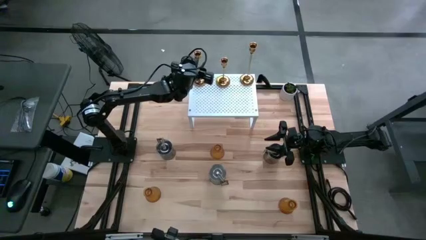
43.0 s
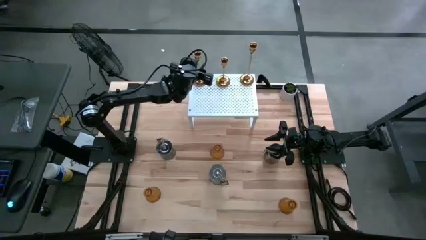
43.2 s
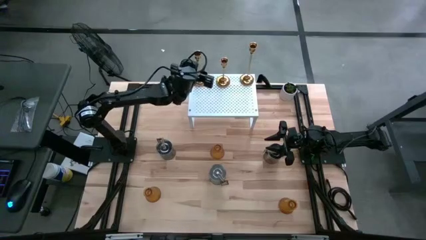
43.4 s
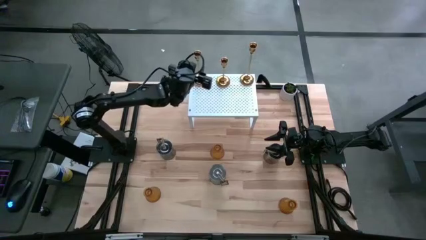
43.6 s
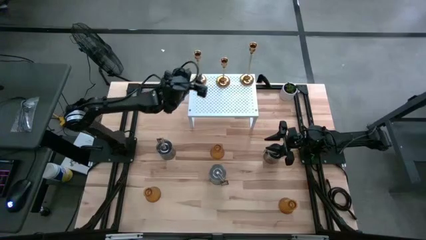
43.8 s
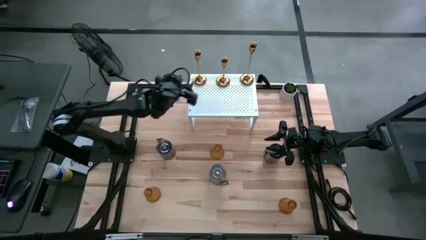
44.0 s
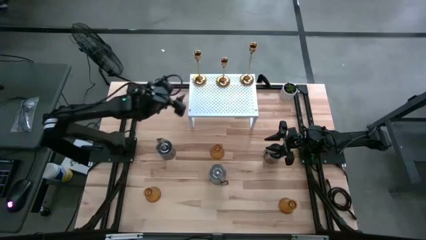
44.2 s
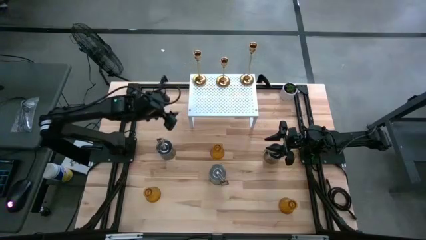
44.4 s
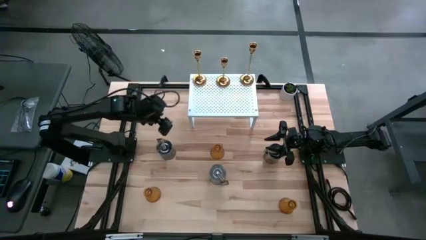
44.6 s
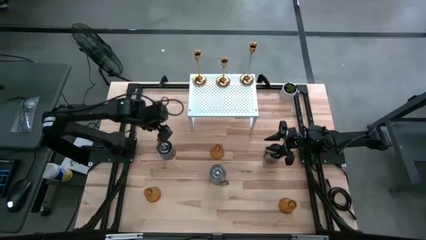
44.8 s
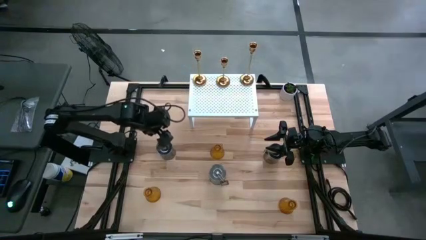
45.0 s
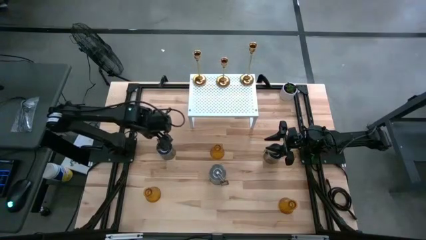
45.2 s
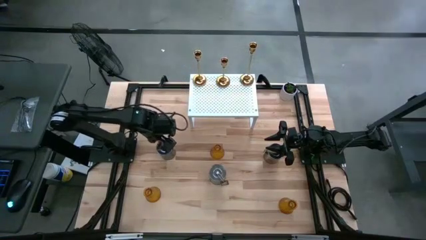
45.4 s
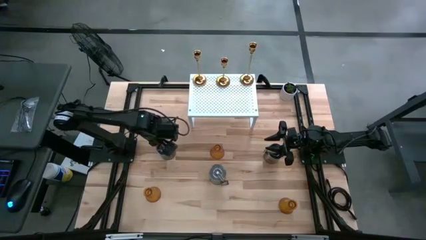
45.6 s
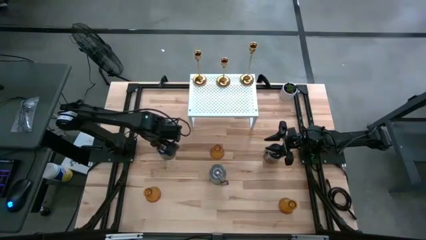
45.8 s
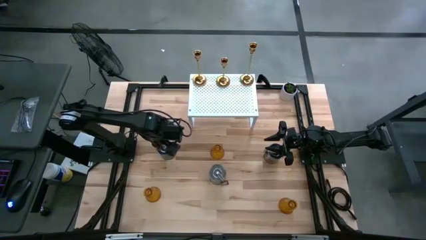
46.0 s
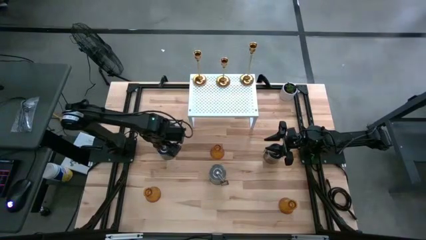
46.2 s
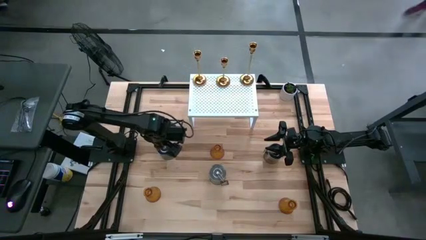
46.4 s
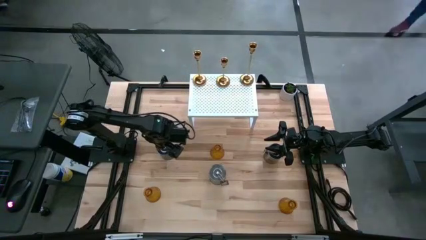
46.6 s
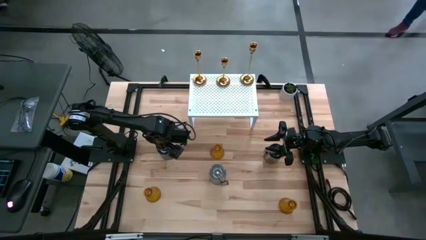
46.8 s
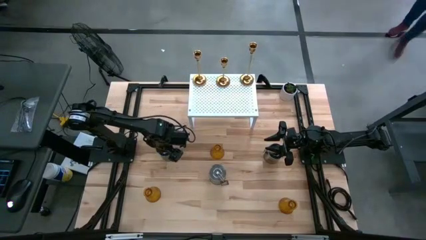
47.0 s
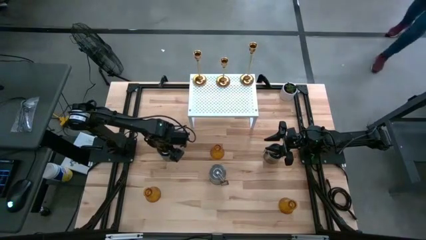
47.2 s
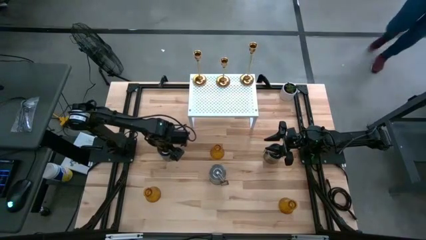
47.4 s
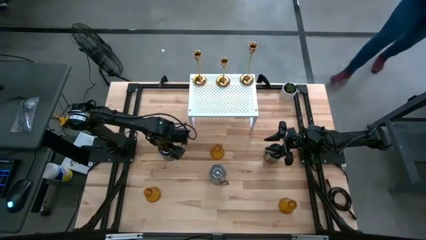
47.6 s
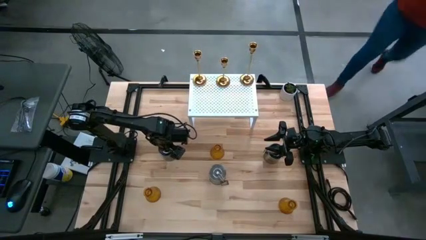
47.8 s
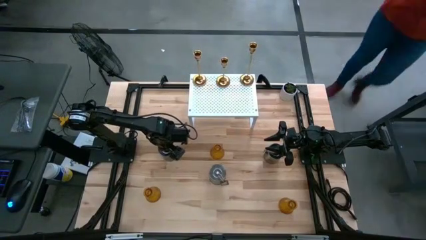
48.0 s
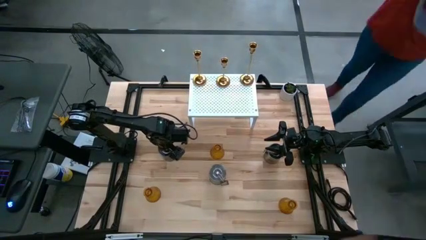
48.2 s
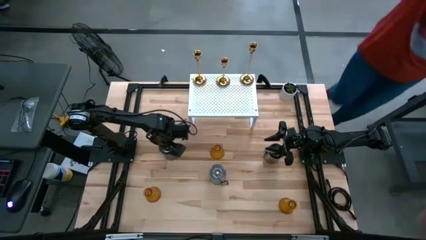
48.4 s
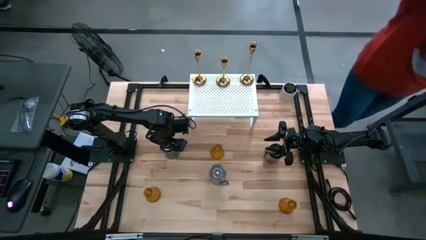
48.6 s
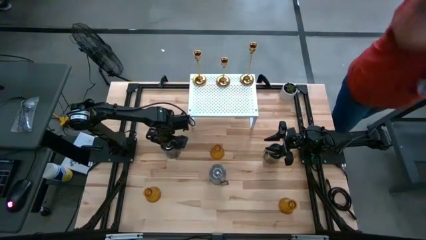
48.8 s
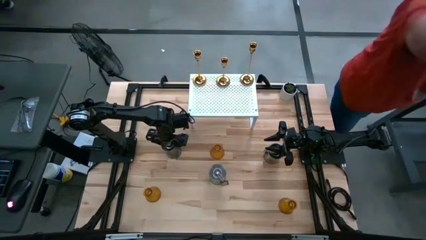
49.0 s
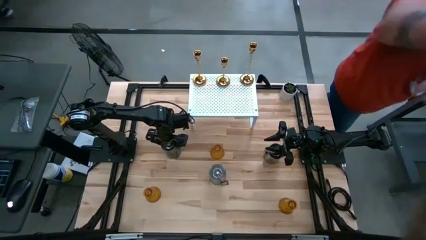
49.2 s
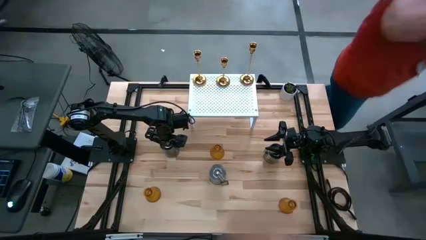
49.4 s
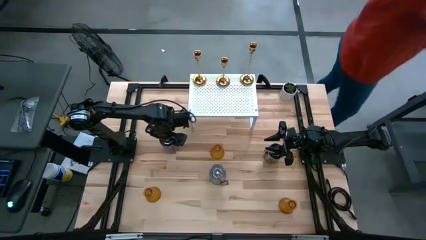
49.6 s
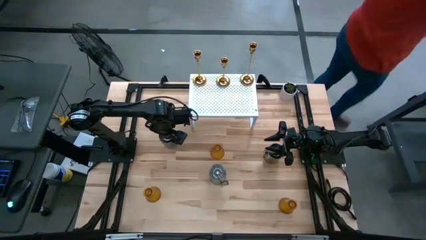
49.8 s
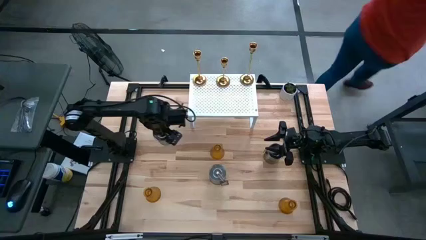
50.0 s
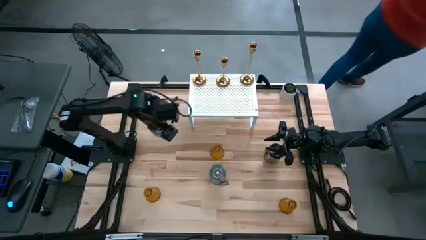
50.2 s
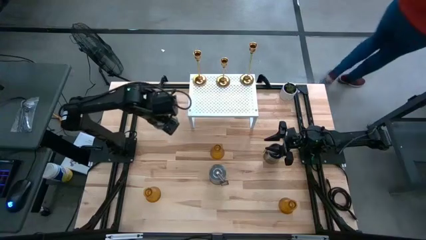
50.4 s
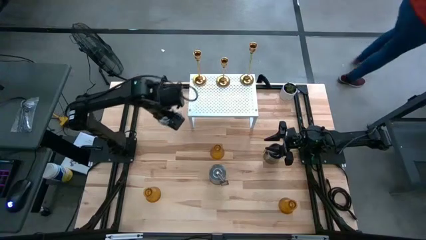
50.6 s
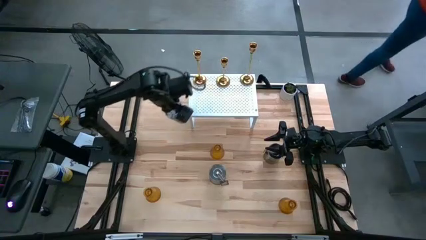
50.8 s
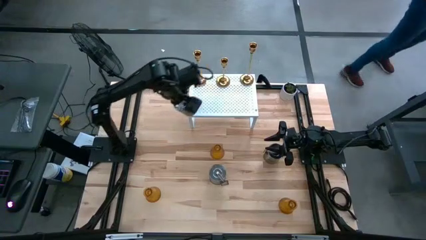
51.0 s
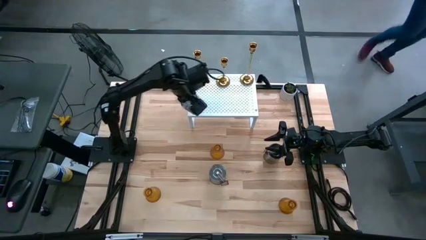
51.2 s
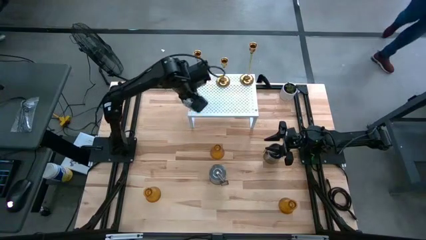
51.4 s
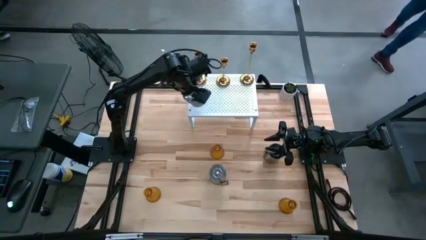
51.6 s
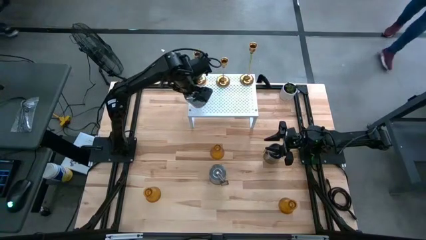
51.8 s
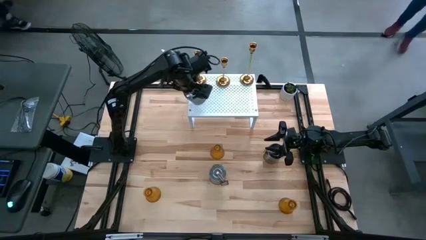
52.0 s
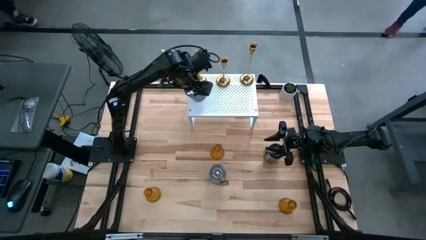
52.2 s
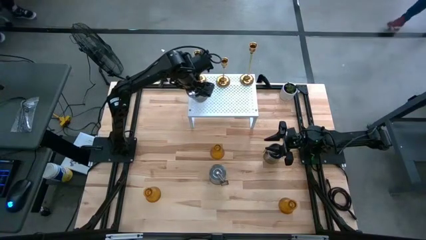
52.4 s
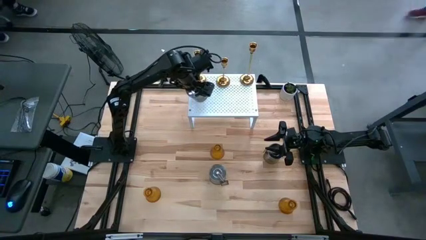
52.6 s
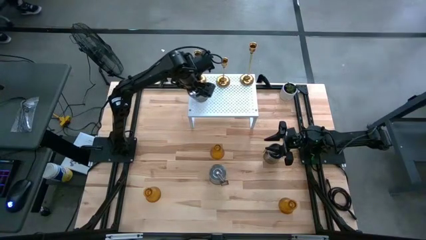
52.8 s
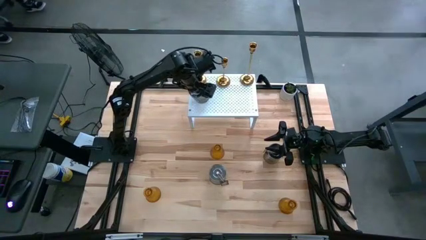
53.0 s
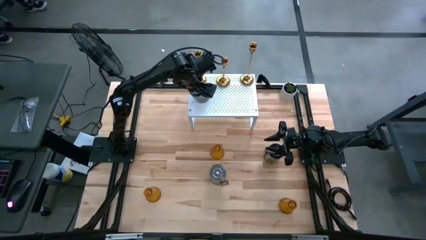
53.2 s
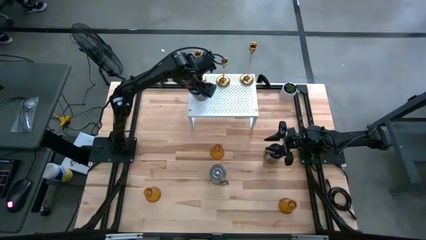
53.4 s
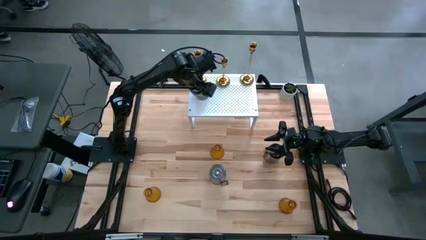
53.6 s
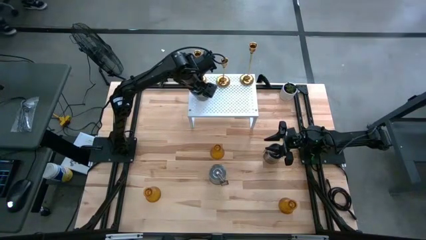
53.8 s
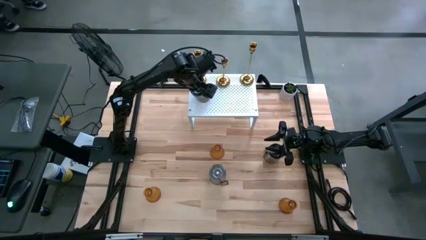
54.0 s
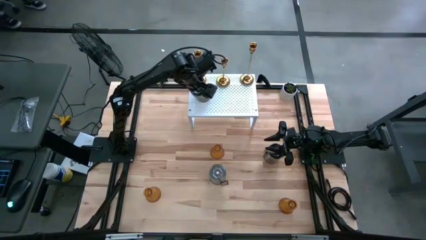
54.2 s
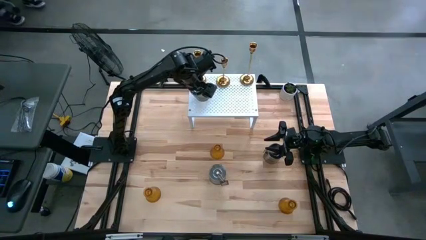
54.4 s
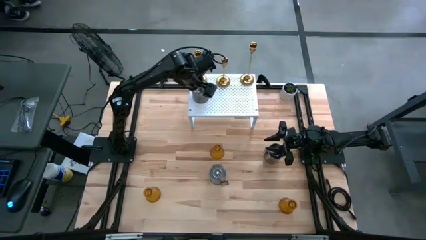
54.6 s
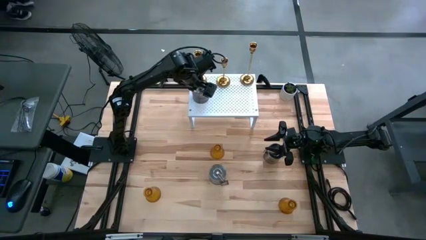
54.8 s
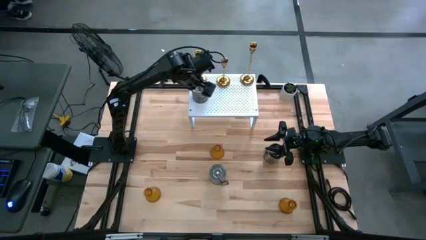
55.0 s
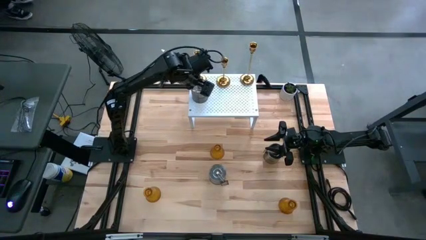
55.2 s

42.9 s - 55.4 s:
Task: Pick & Place candle stick holders
Put the middle left scented candle on the shelf

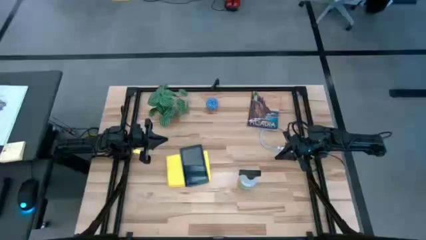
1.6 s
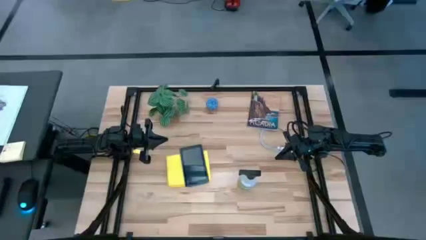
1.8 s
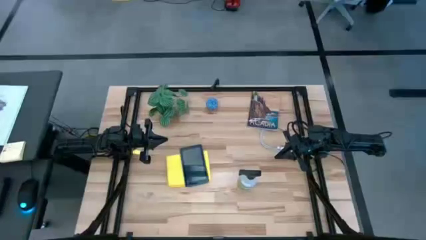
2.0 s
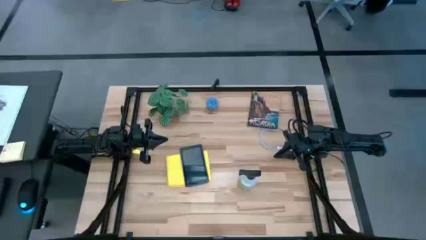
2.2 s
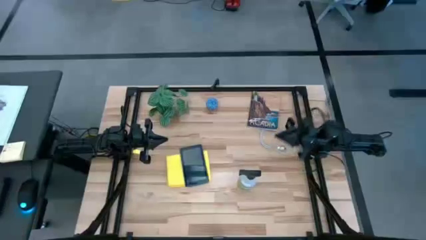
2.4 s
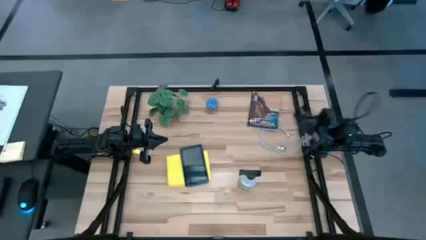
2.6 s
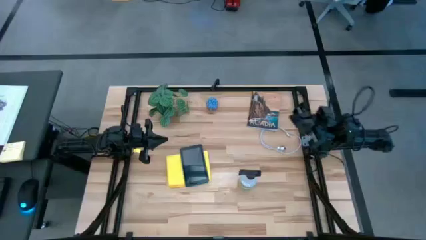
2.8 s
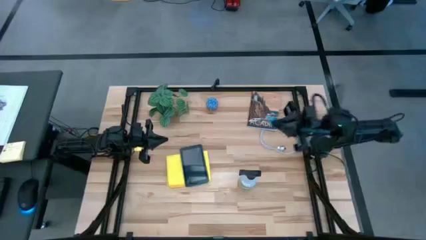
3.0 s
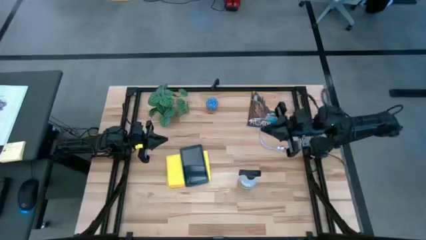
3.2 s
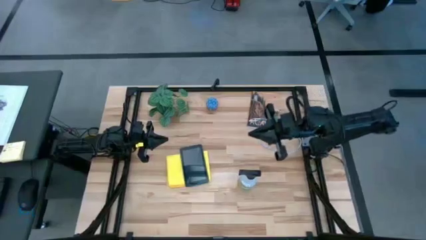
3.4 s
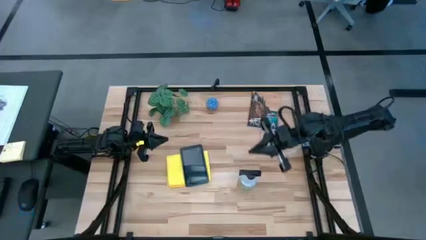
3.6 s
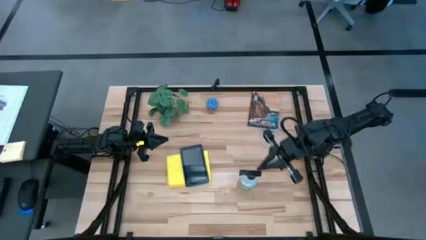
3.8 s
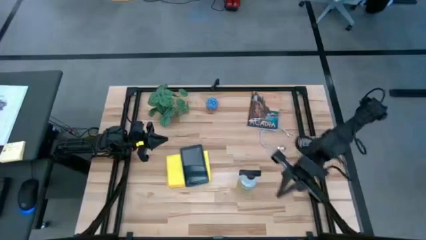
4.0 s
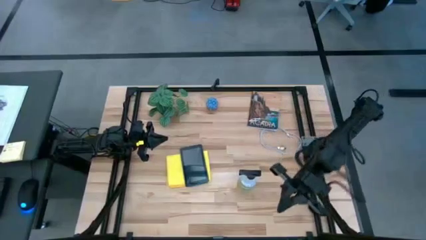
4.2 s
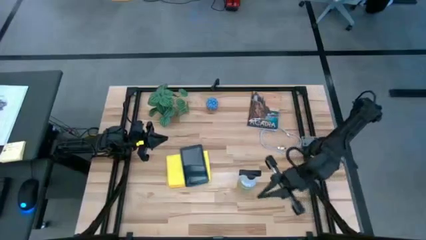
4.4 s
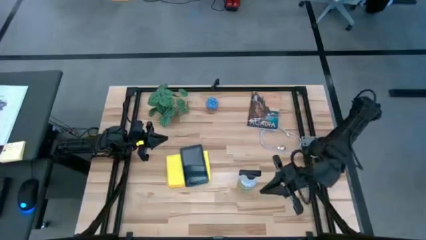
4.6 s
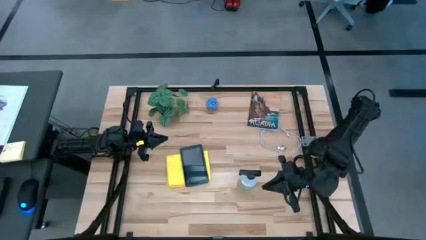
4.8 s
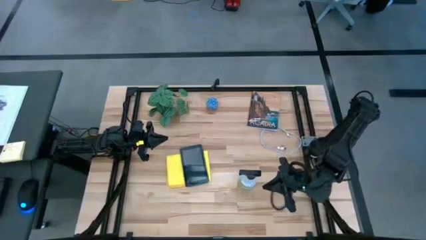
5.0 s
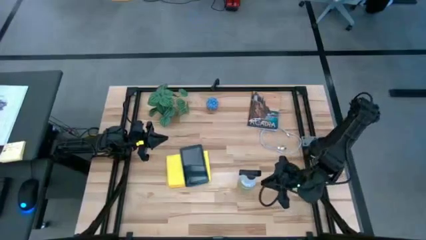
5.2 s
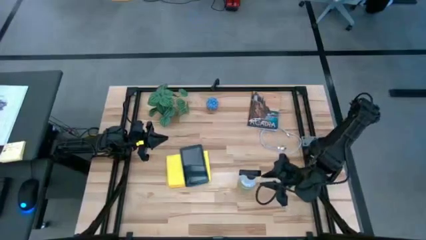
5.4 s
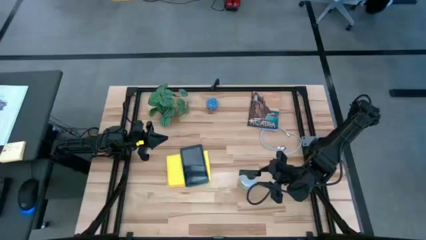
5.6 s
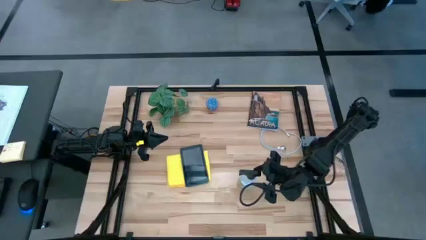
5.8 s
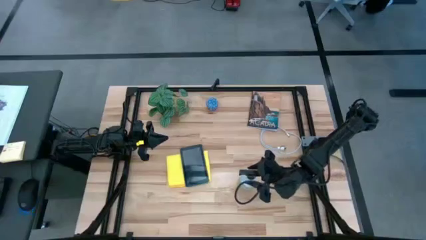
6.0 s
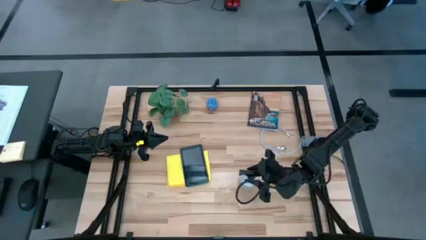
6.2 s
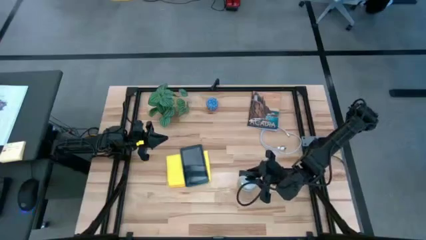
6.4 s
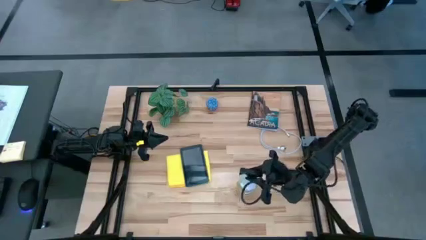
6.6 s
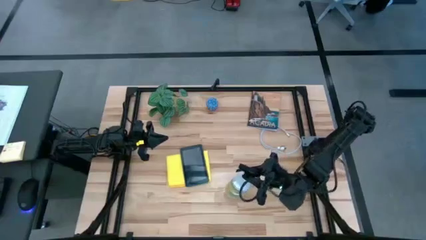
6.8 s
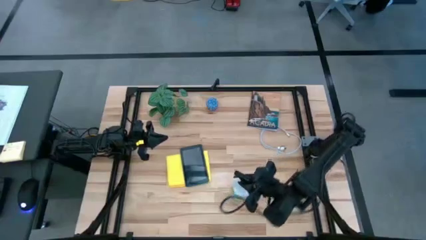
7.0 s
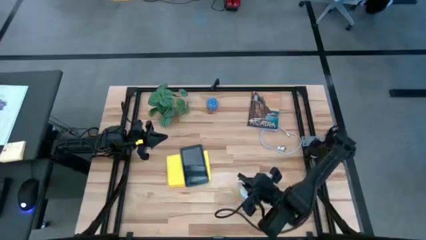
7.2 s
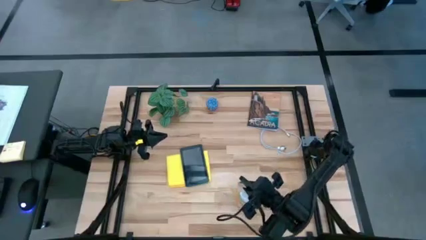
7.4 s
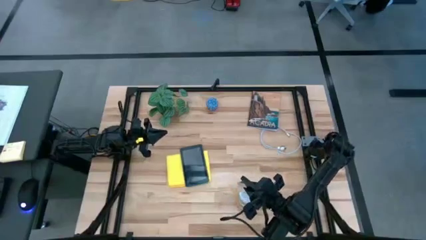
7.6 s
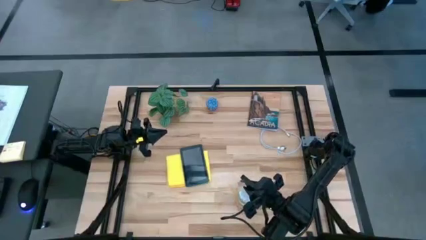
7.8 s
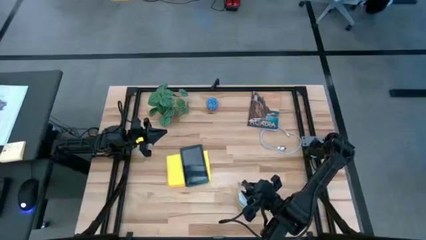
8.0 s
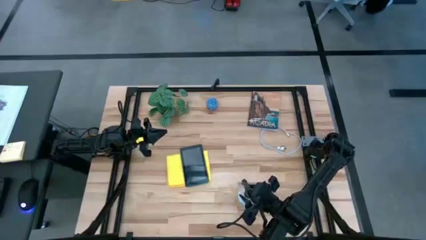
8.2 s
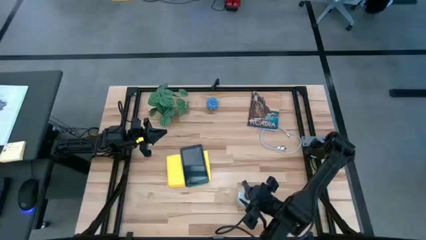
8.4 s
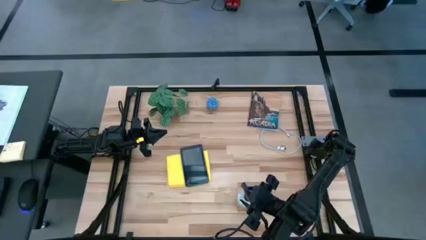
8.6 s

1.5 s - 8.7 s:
Task: Apply microfiber cloth
Move the white spray bottle to the bottom
